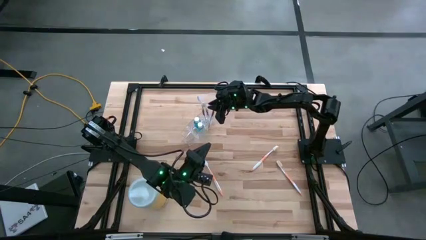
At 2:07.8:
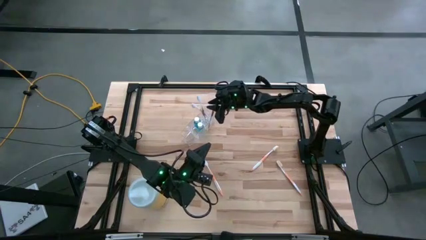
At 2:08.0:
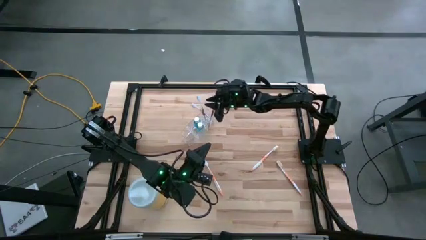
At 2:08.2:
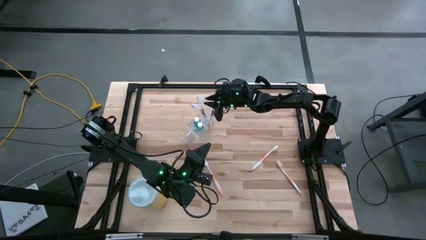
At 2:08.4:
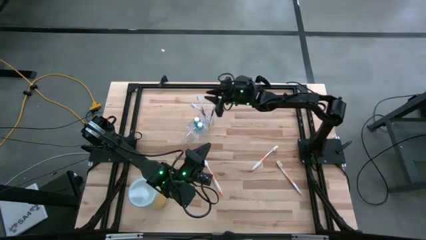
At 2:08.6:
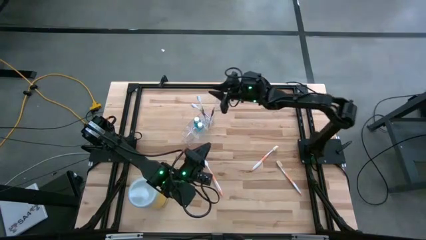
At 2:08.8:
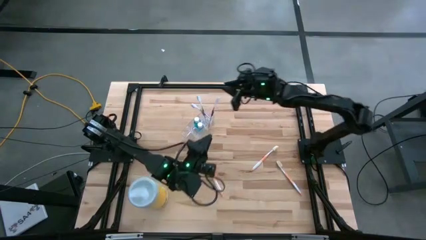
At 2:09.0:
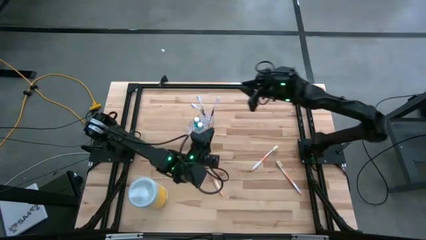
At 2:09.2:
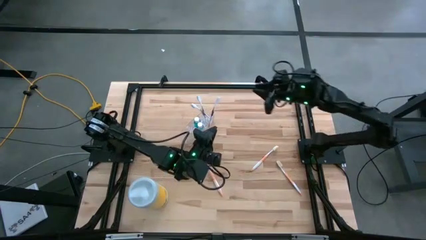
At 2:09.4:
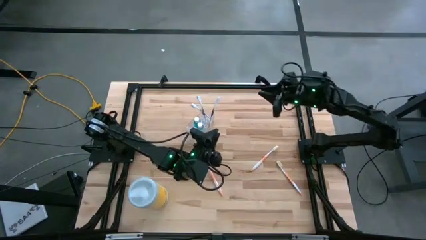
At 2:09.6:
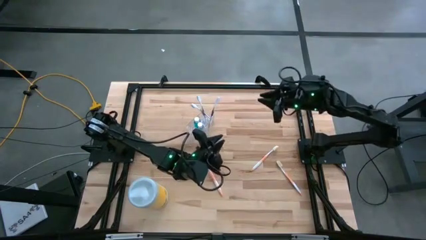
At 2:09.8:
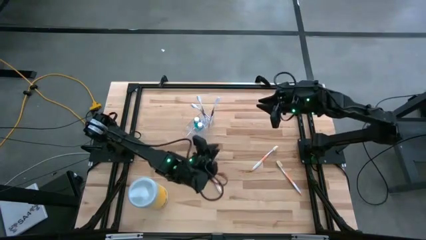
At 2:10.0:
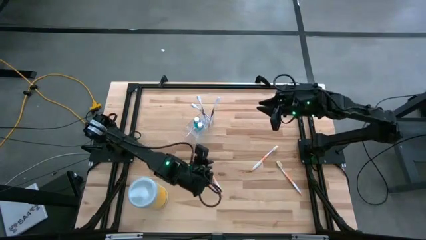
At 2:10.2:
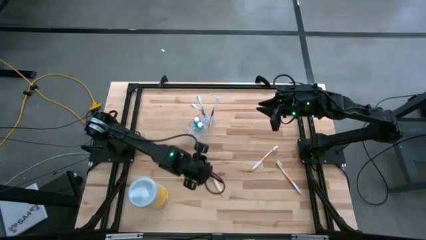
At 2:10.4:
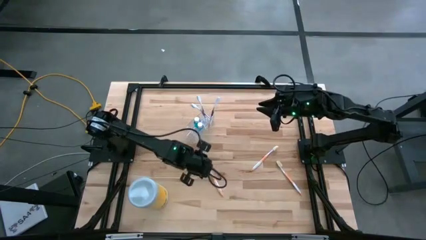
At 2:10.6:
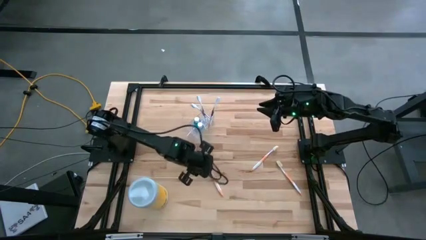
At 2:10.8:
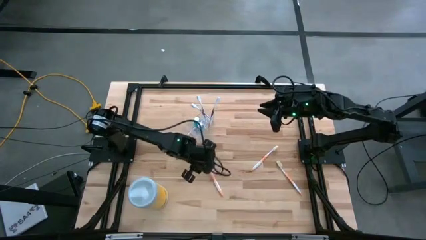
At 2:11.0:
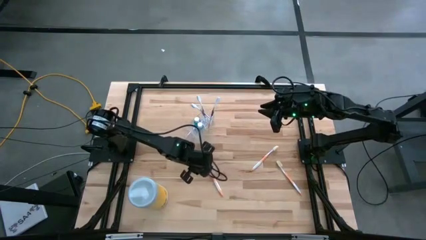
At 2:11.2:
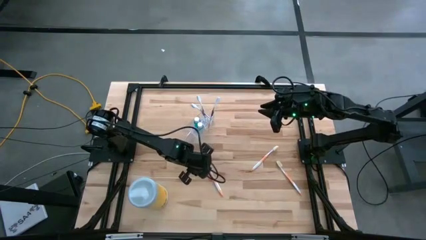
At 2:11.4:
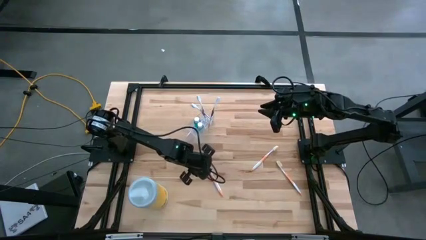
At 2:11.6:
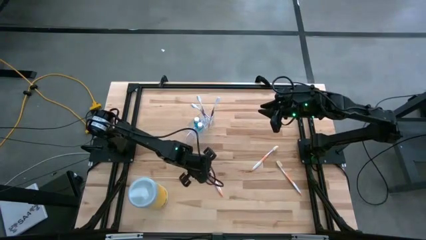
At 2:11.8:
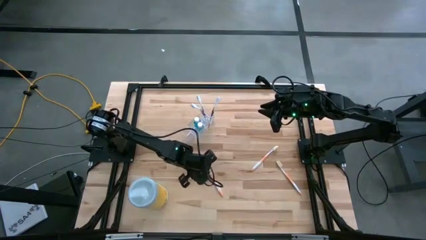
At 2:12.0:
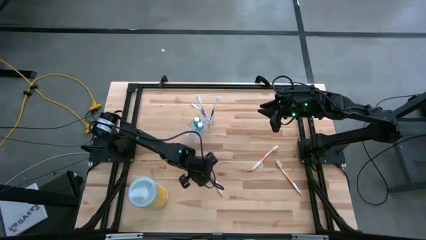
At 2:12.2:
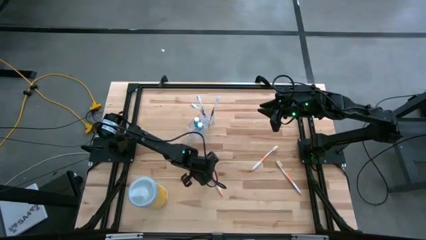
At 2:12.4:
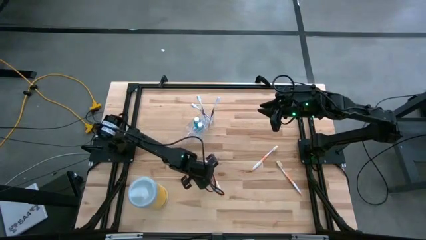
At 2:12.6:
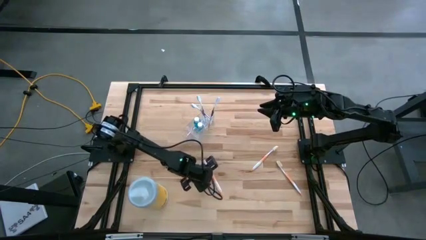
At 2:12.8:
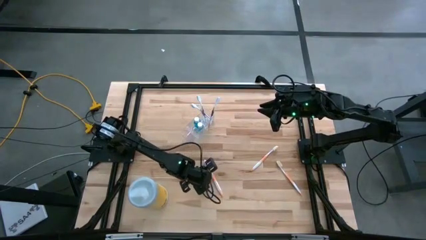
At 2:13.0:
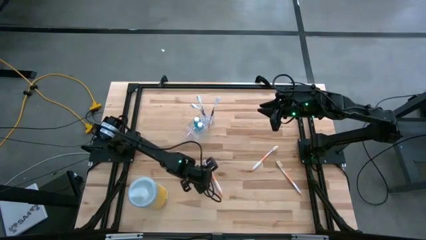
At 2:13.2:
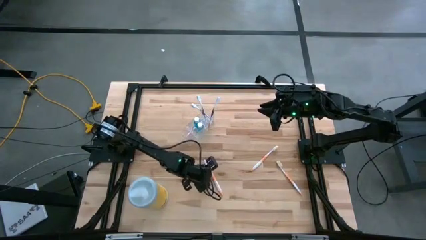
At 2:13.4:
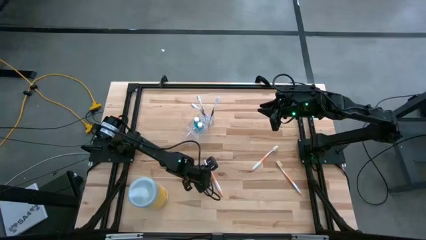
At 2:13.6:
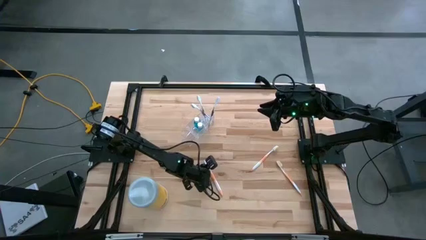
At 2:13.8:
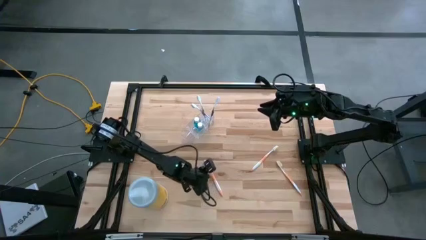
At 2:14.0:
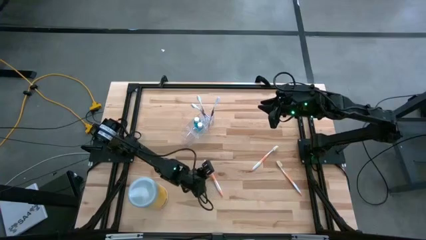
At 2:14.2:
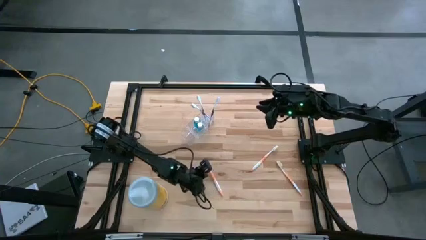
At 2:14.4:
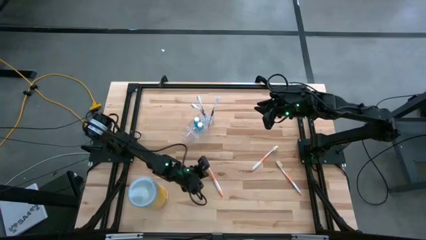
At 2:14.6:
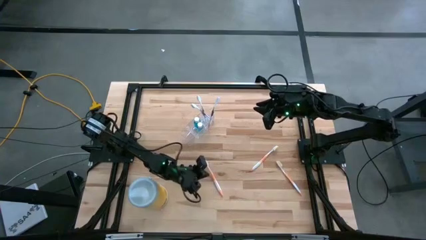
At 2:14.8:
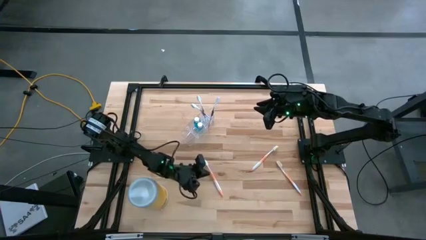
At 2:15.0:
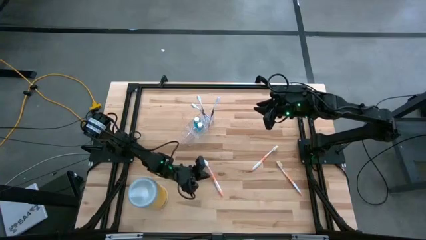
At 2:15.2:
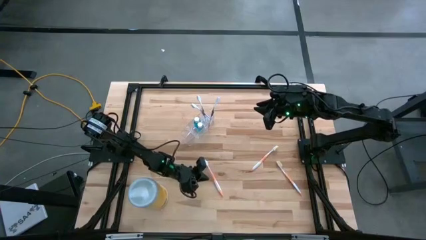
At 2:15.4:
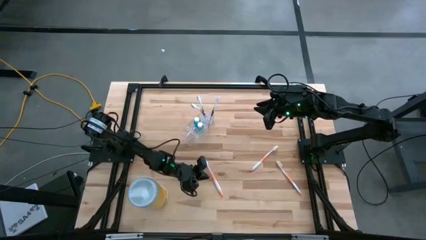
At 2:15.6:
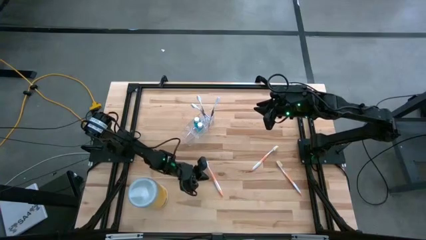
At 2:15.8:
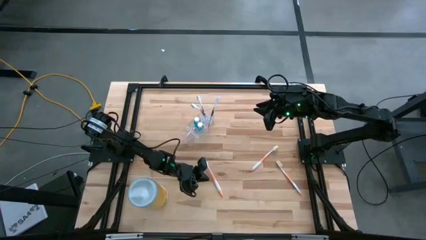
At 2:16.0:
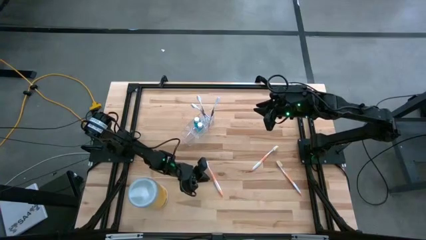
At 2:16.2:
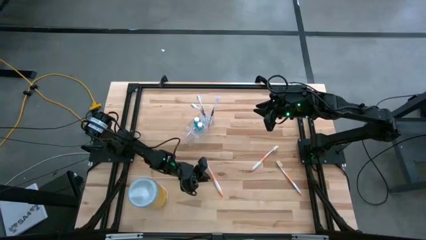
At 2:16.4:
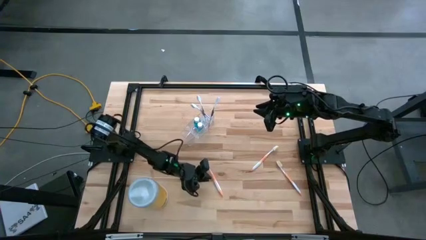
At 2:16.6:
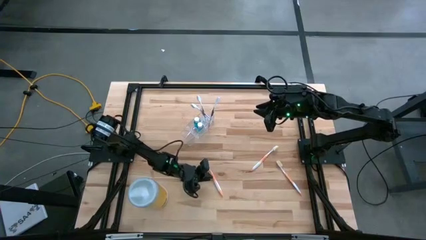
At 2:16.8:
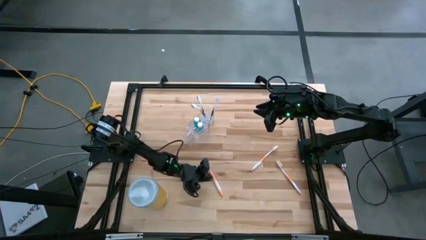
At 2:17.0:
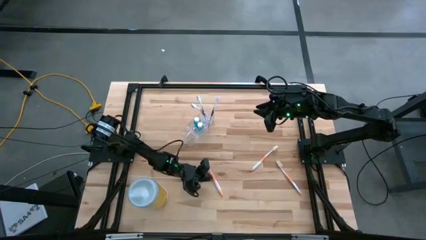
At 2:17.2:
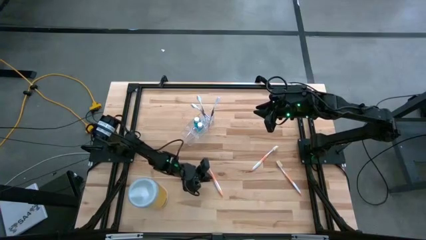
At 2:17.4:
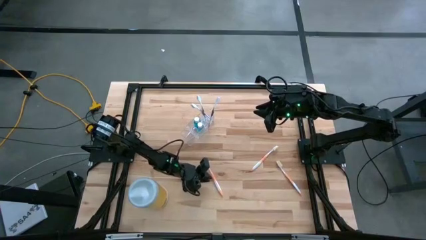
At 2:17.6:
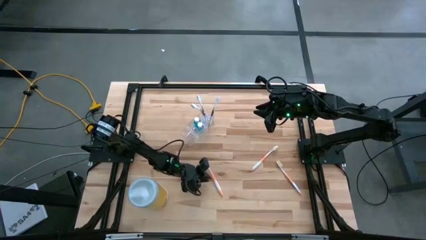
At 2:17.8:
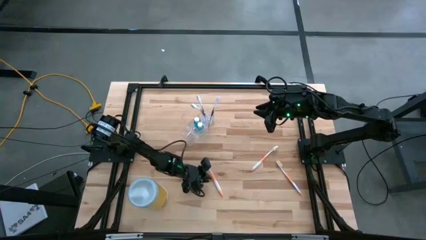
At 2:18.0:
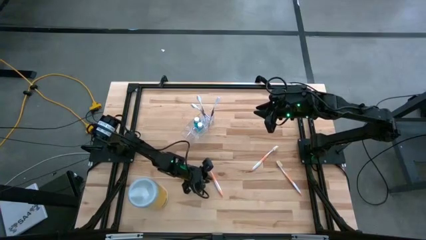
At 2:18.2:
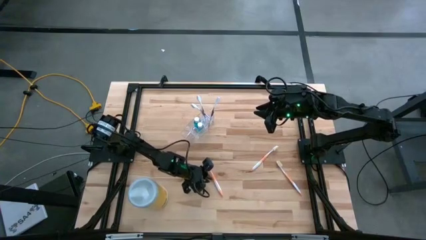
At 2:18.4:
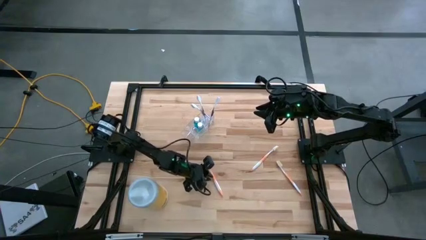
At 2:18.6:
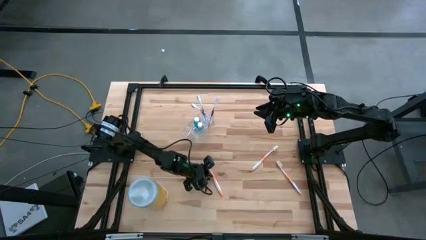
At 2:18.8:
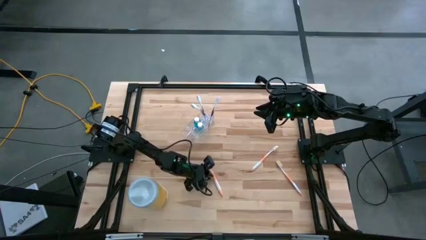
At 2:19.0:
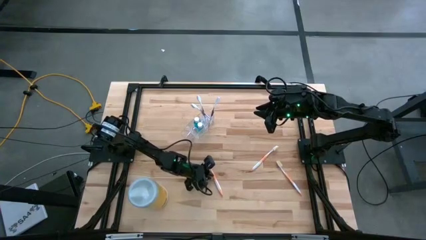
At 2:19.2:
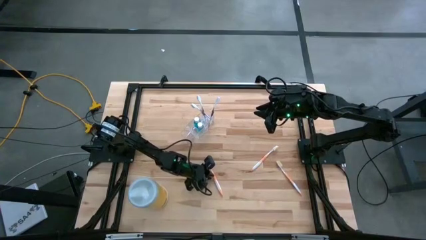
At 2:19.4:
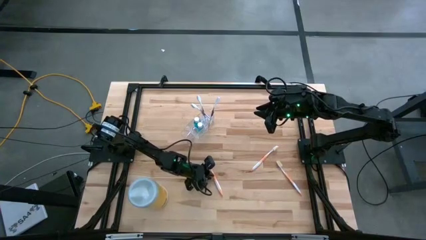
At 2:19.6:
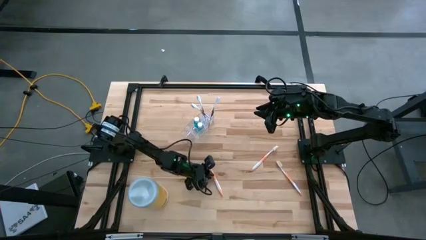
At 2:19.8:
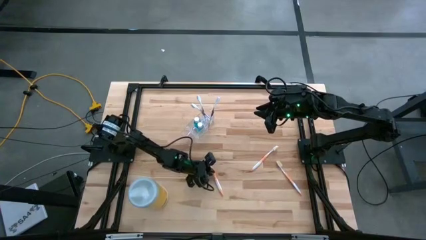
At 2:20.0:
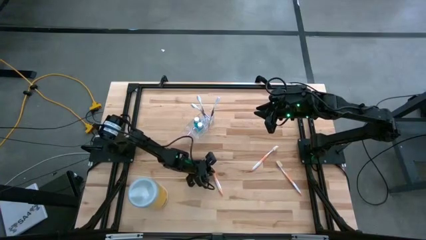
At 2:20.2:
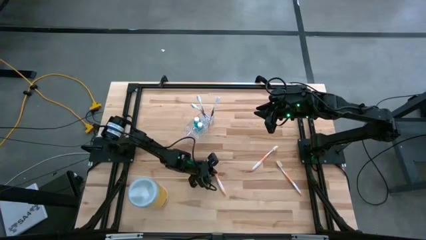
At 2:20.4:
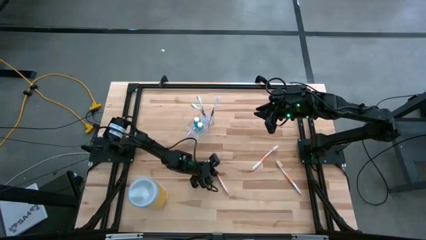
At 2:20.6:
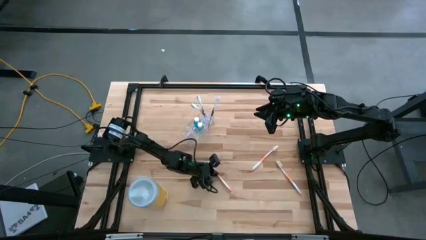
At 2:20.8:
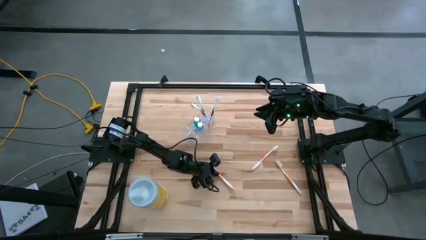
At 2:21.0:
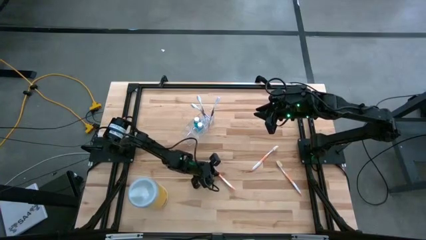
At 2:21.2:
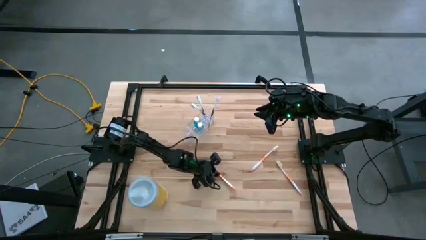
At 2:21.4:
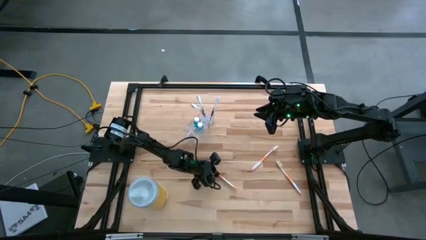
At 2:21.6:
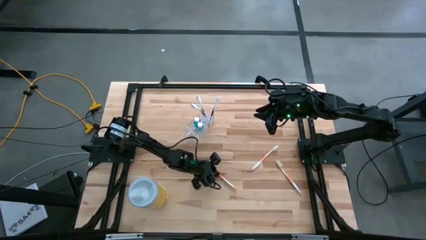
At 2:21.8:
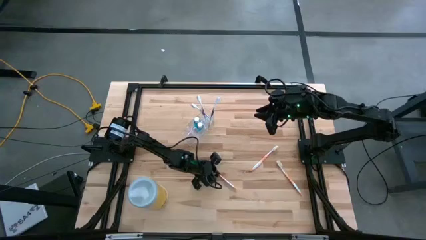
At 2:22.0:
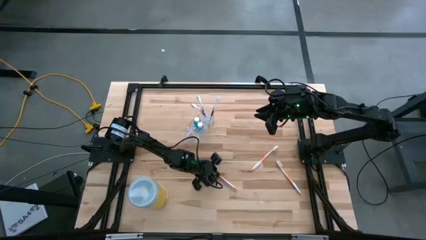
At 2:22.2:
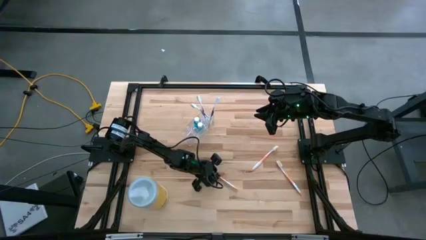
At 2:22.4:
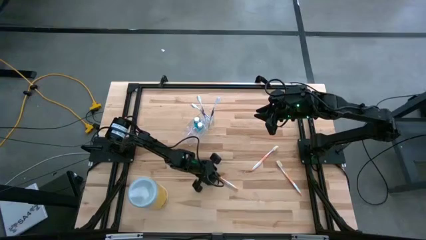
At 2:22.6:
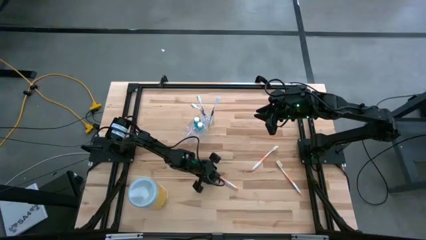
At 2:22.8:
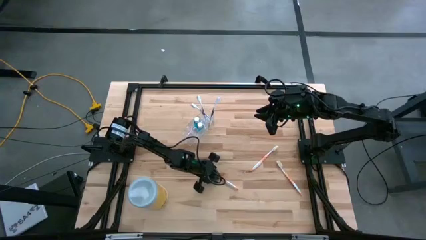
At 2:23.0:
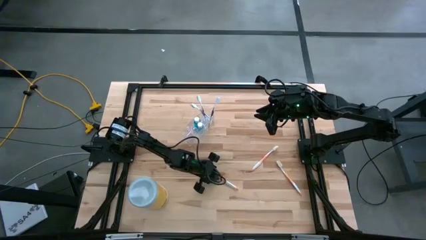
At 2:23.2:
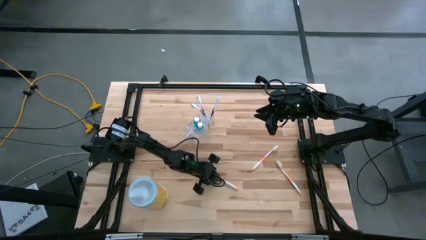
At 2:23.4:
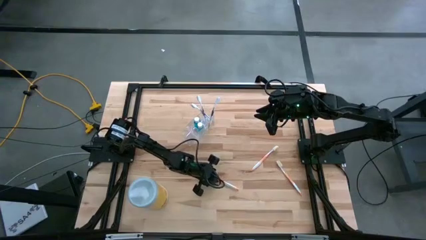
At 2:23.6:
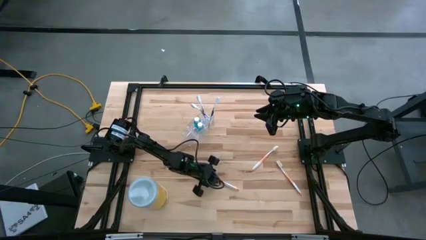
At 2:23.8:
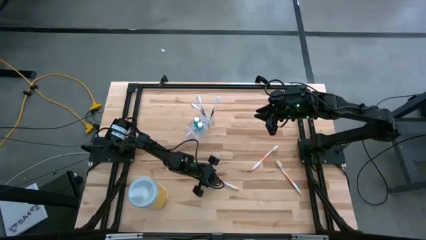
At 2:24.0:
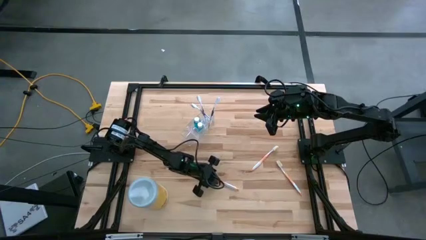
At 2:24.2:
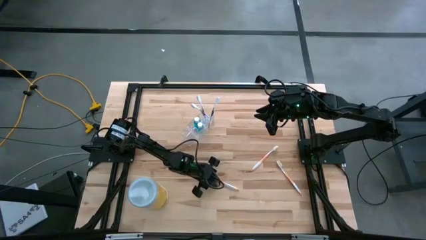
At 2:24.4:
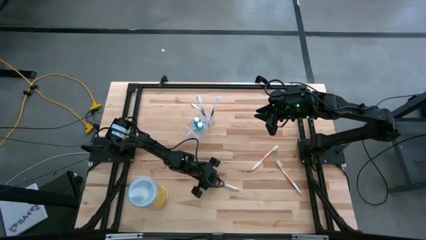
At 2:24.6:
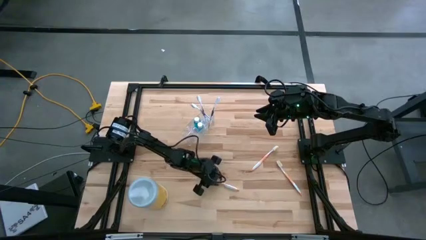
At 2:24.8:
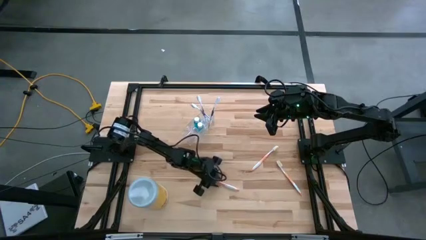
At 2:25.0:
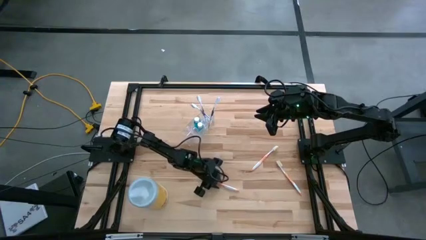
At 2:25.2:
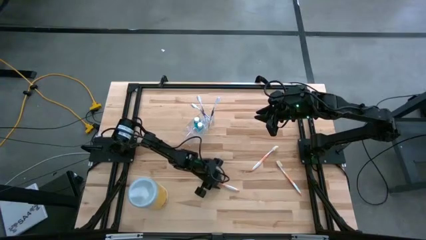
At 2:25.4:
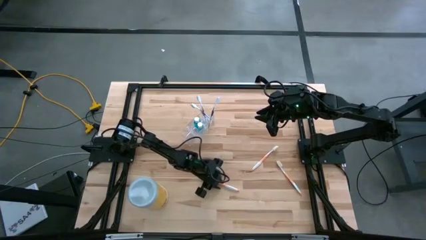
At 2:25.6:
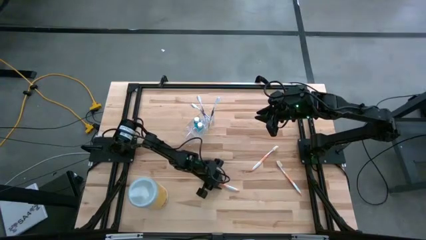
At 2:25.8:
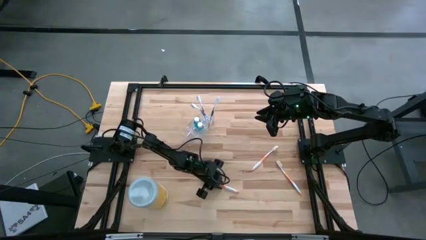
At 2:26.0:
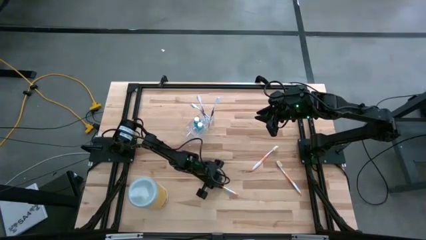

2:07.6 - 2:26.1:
Task: Pick & Place toothbrushing station
Put the left orange toothbrush into the transparent organizer
